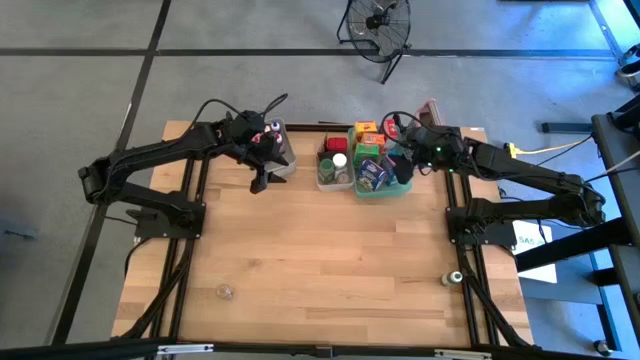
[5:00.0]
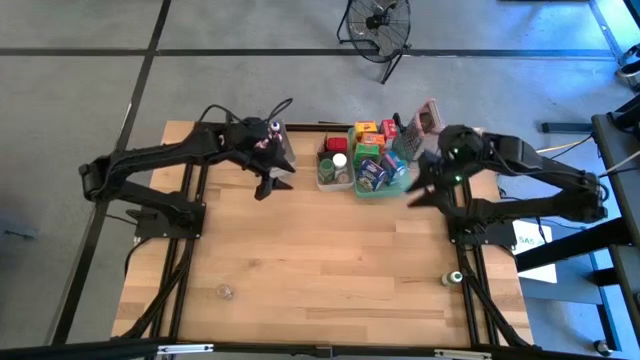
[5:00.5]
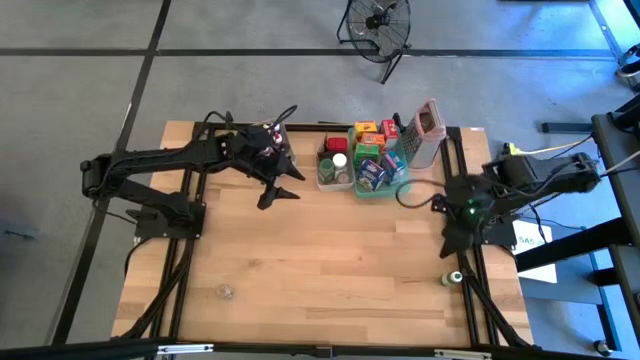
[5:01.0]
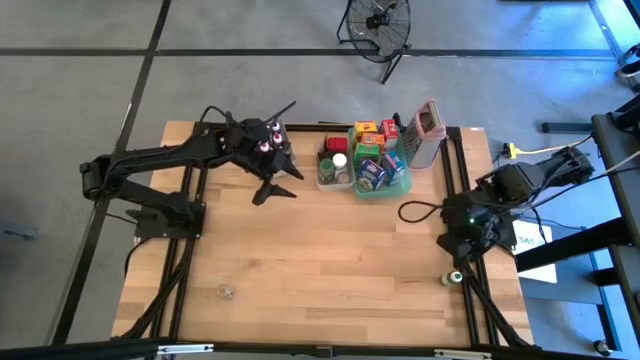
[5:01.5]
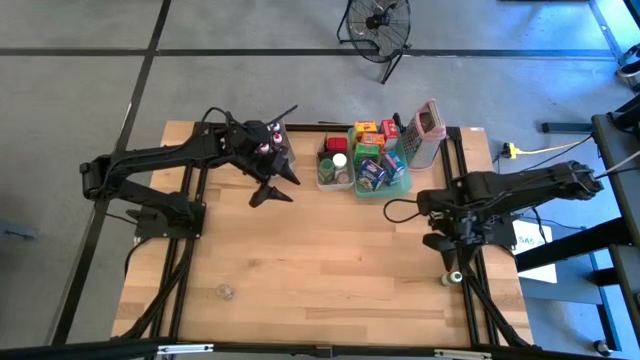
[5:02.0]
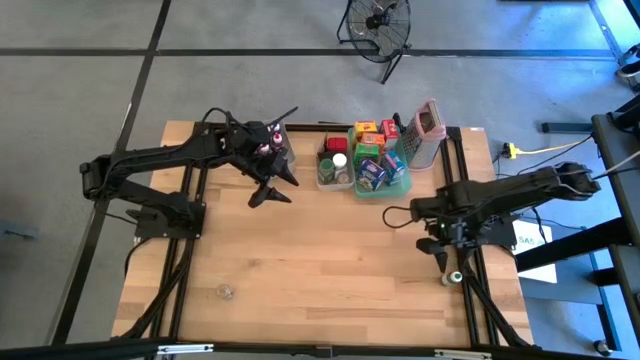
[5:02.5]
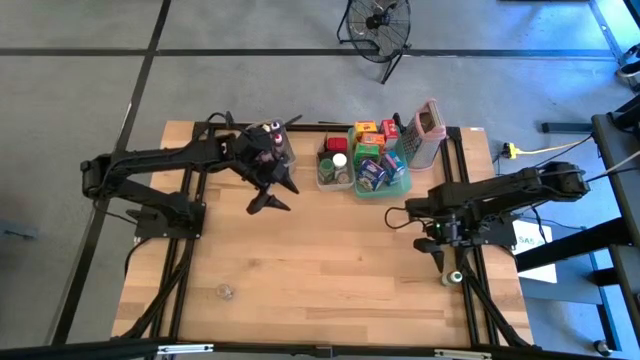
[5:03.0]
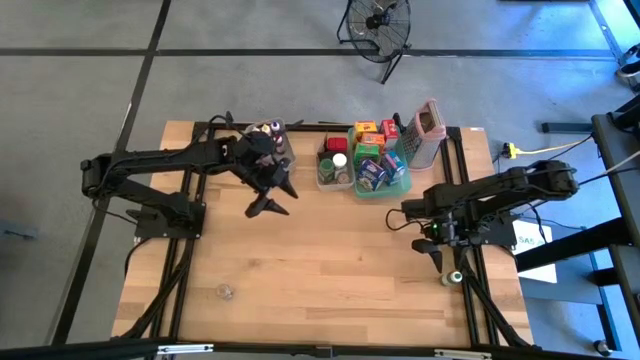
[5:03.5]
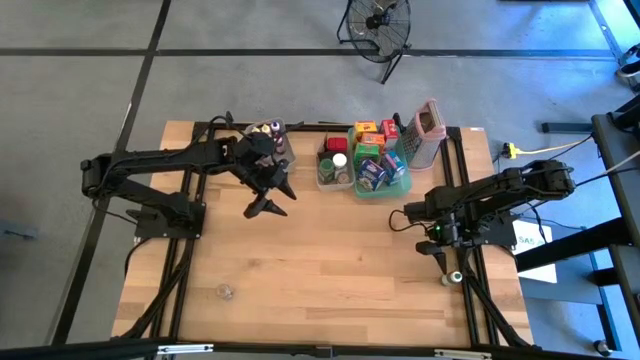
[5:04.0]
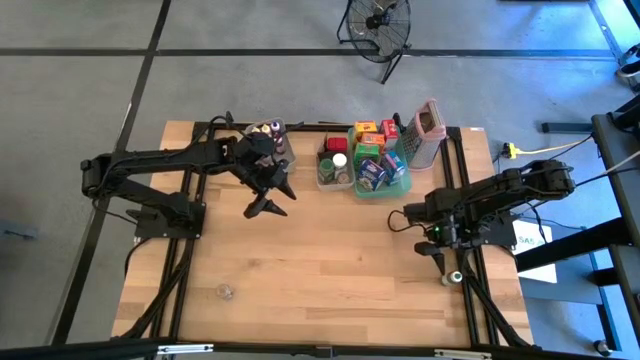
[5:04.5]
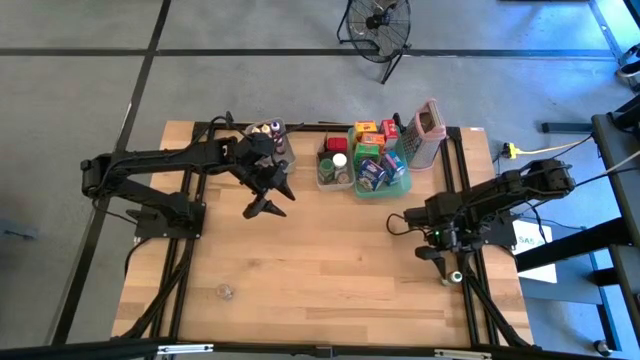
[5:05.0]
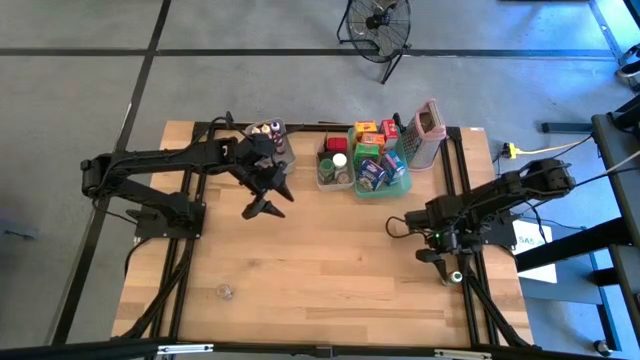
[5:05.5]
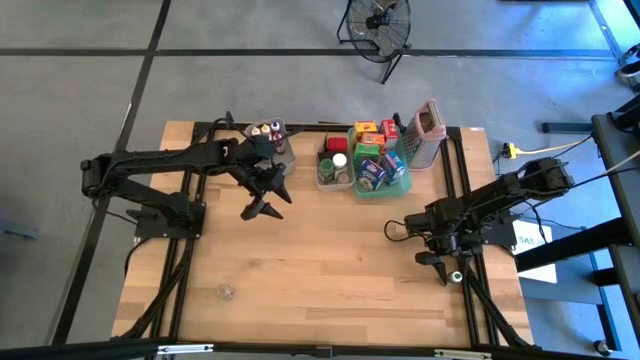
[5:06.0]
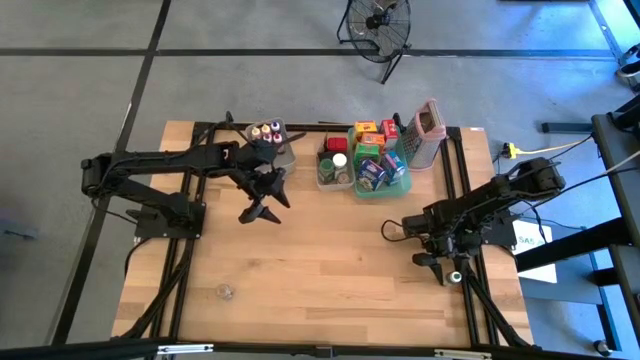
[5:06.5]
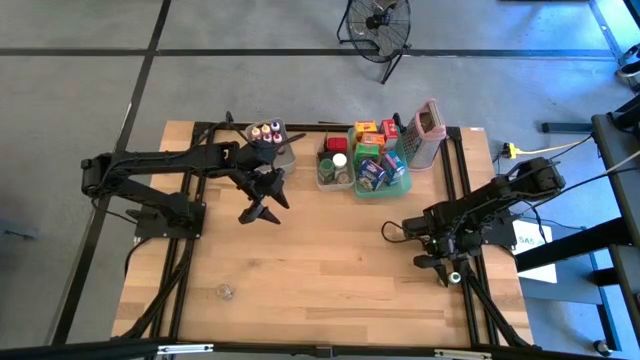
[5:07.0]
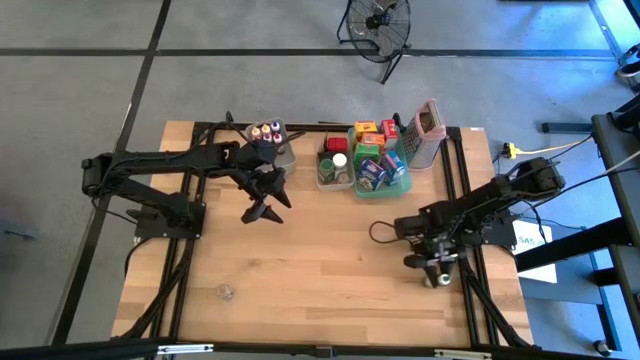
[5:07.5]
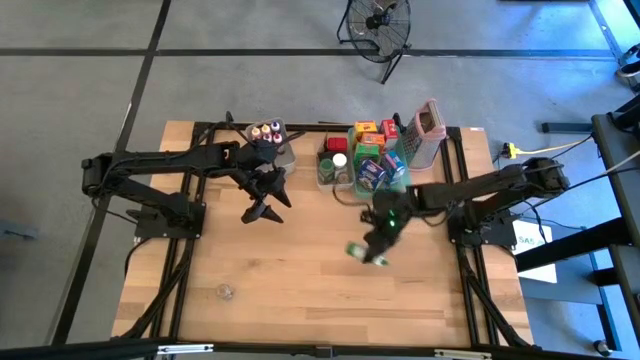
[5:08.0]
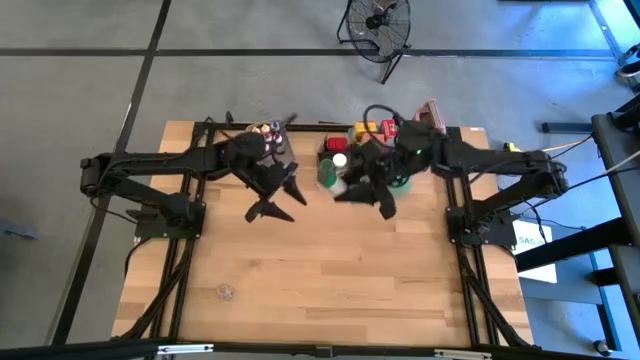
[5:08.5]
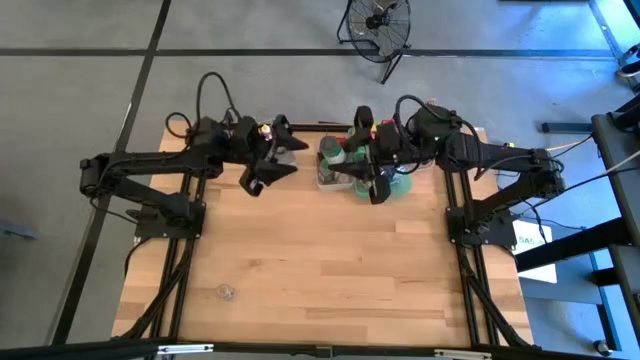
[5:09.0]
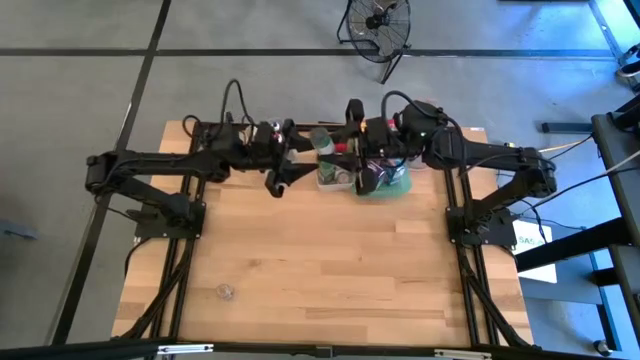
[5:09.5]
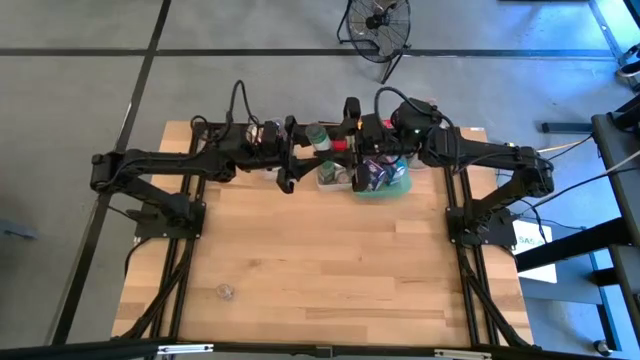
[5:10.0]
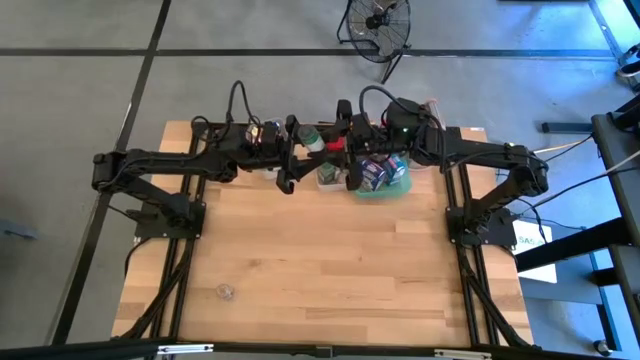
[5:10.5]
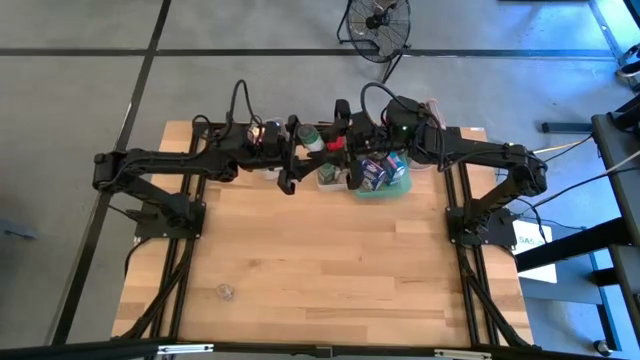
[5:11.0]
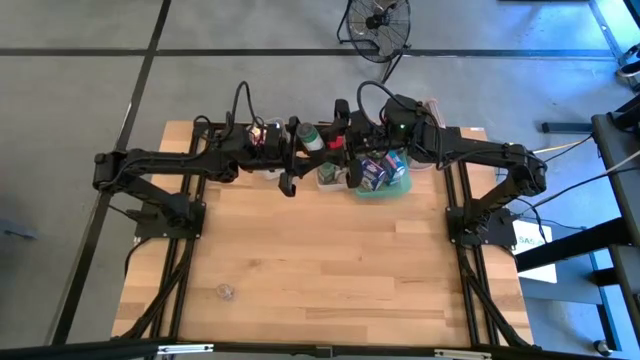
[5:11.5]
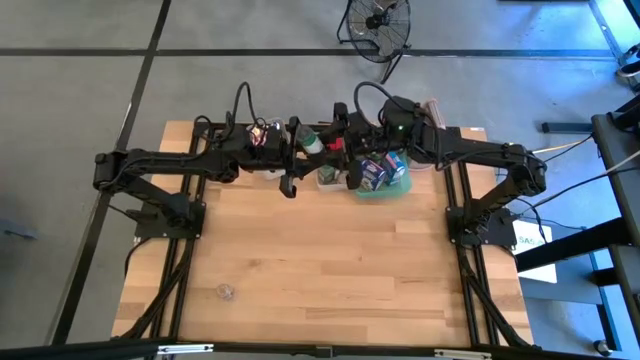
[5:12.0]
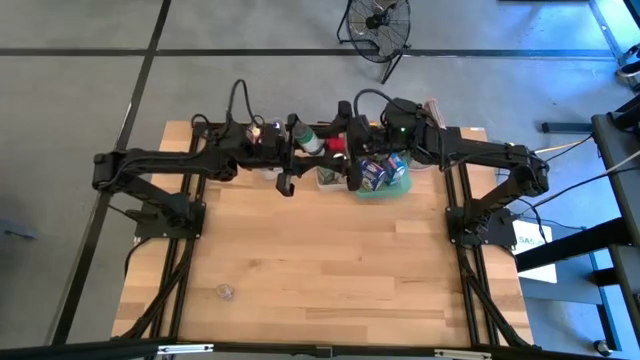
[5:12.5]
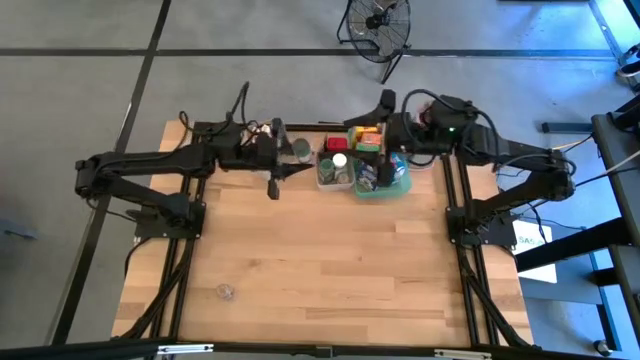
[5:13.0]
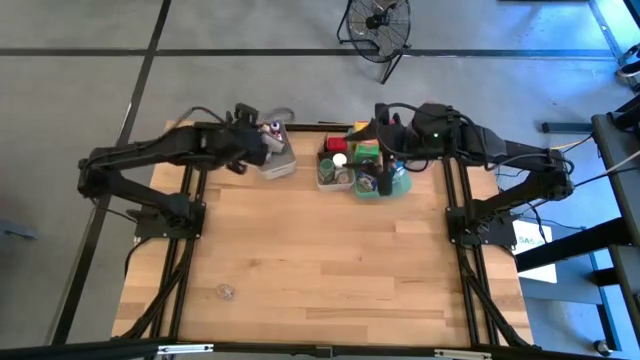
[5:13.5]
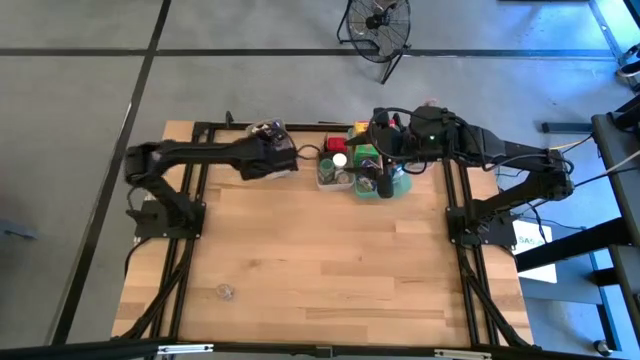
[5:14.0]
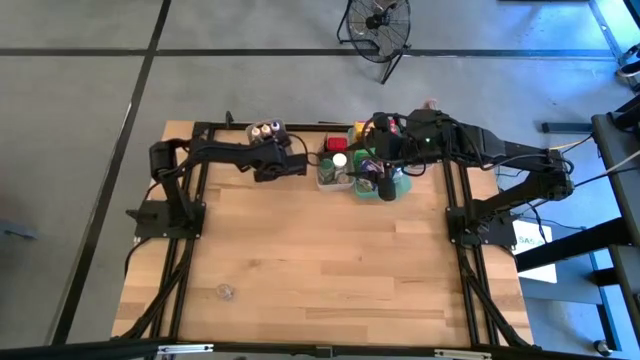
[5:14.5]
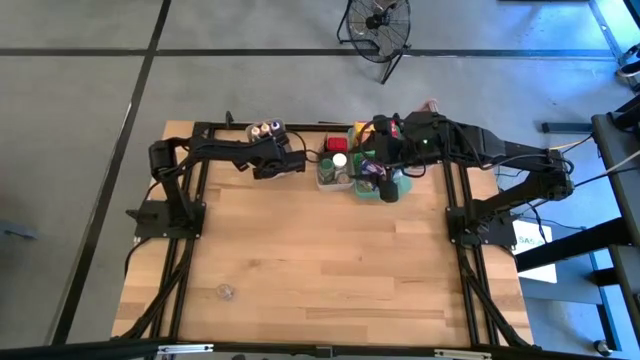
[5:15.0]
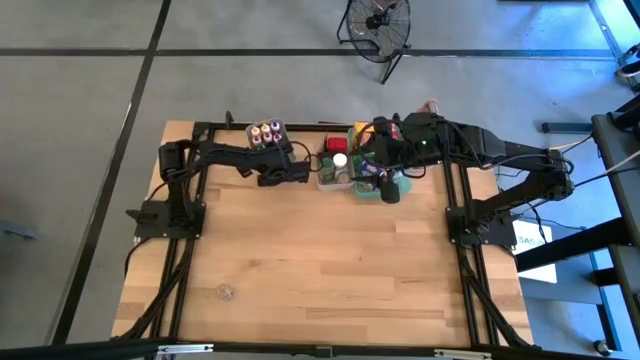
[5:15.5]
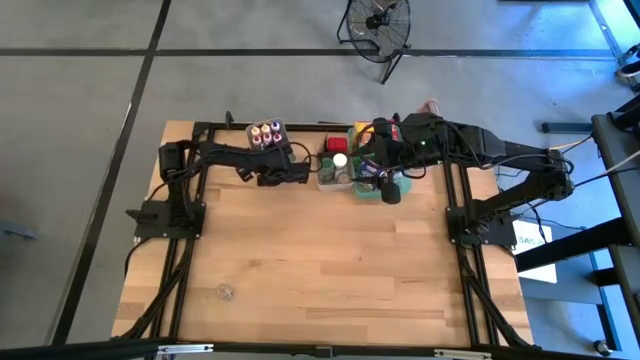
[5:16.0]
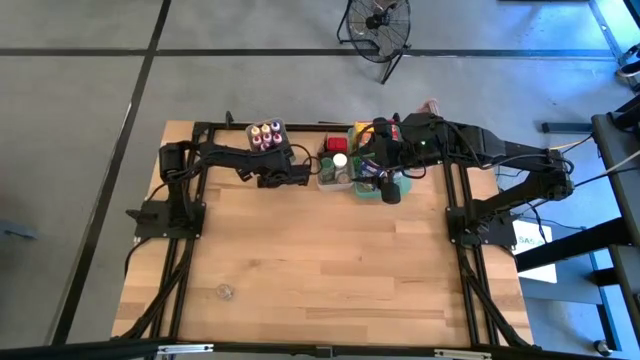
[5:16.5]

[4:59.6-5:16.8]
Task: Pick & Place Kitchen Items
Put the green food coloring bottle into the gray bin

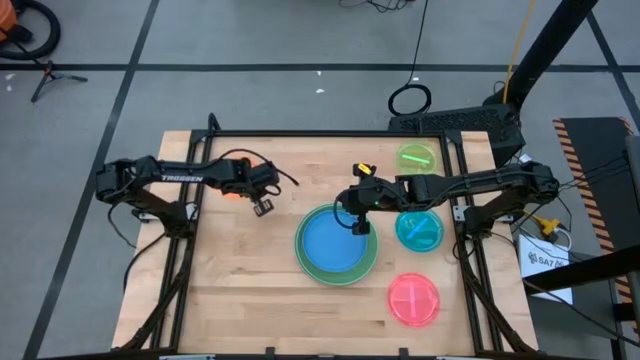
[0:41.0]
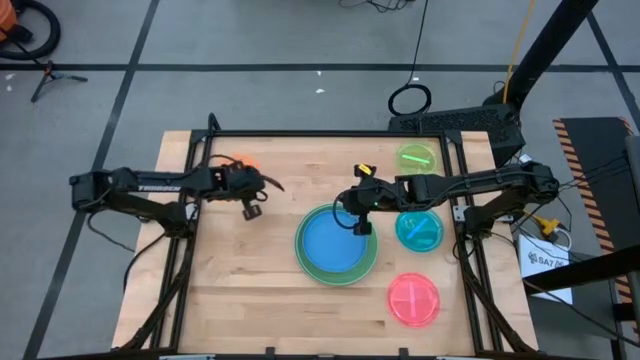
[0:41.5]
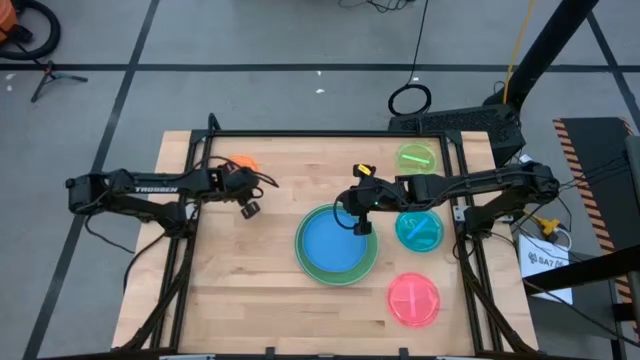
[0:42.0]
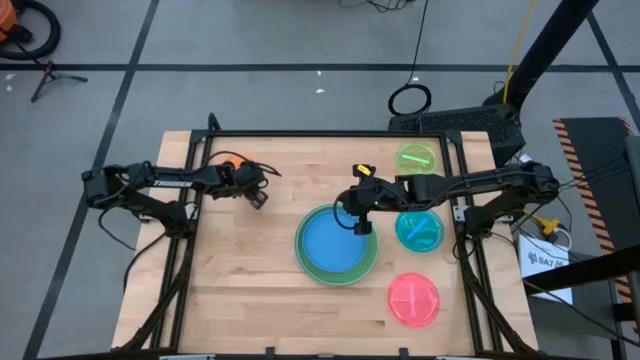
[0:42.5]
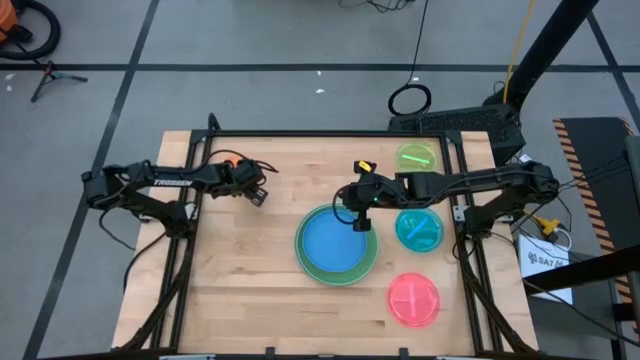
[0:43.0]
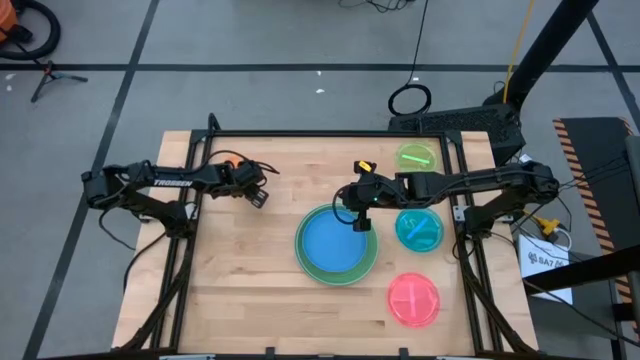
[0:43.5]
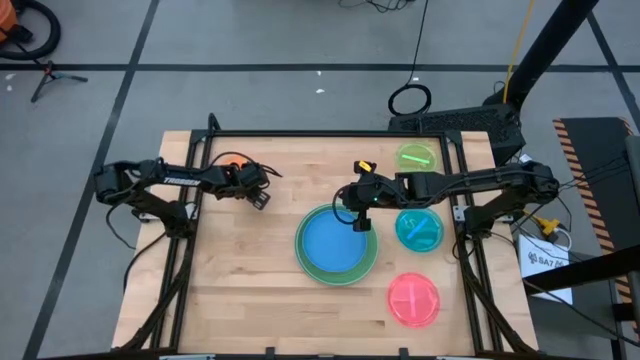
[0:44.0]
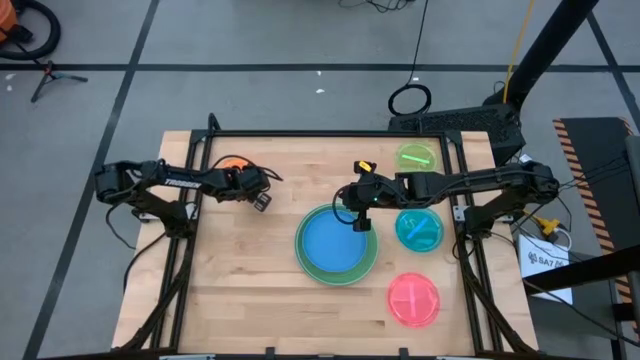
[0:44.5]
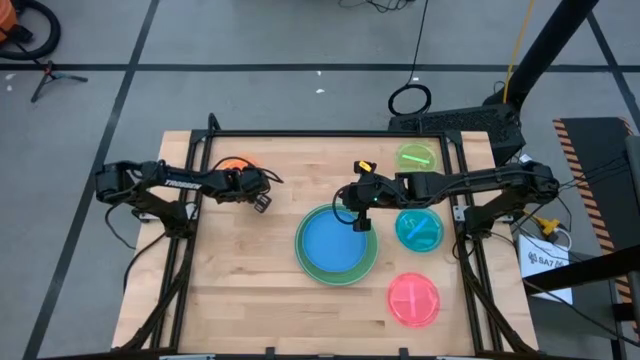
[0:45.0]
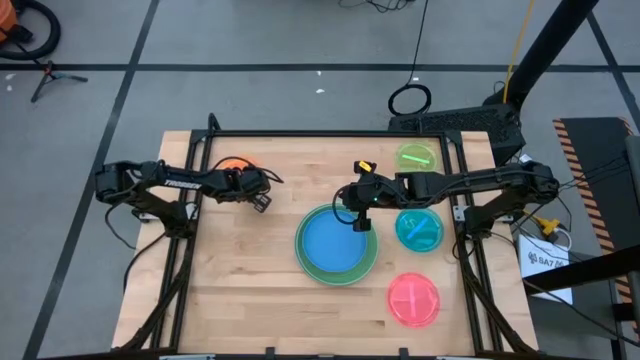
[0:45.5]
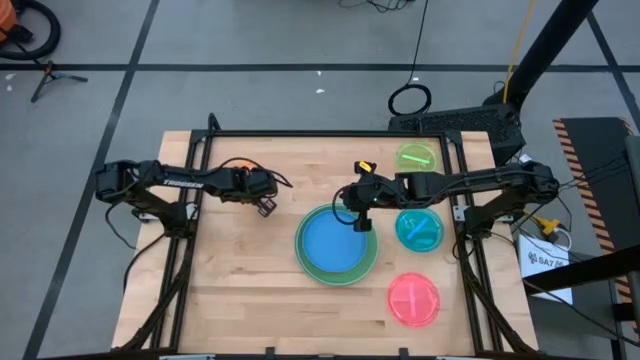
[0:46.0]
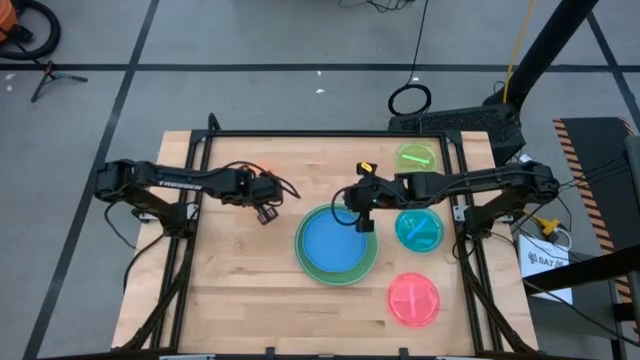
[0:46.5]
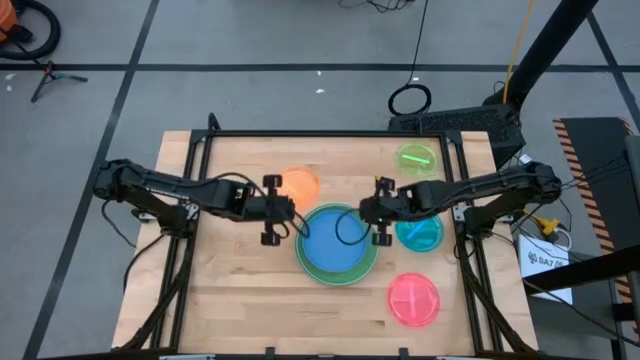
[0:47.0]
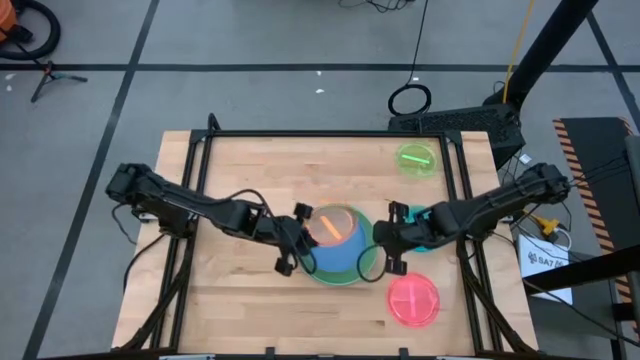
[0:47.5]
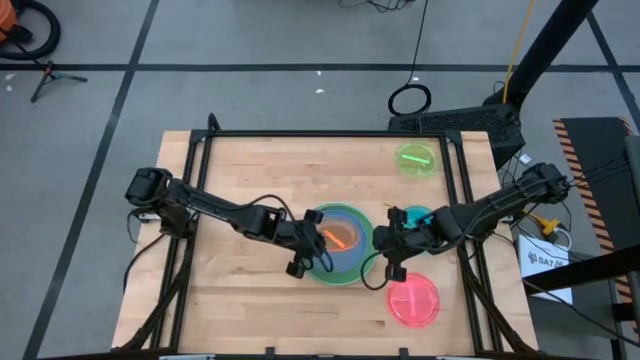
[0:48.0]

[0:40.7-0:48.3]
Task: Stack plastic plates
Stack the orange plate on top of the dark blue plate
